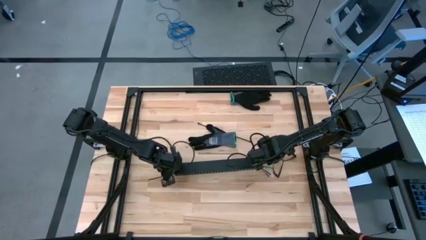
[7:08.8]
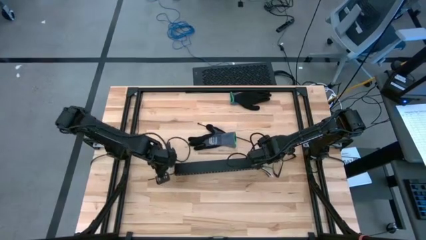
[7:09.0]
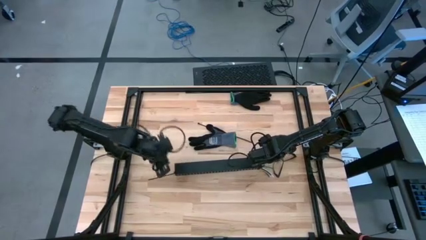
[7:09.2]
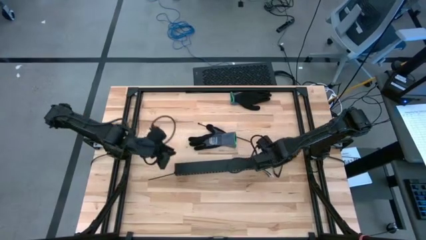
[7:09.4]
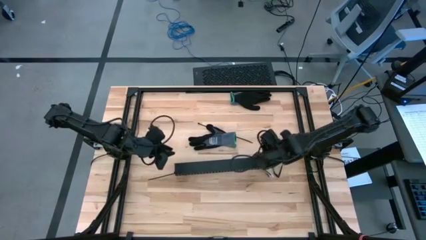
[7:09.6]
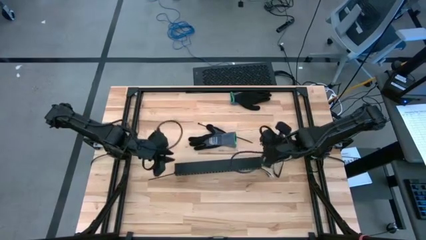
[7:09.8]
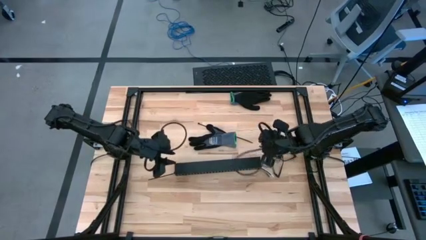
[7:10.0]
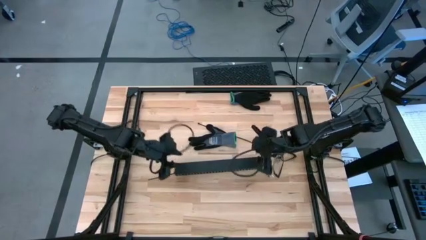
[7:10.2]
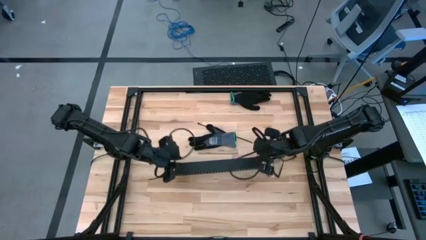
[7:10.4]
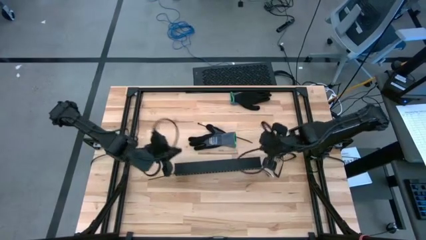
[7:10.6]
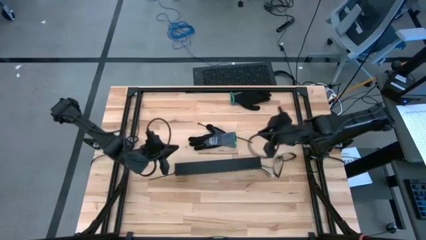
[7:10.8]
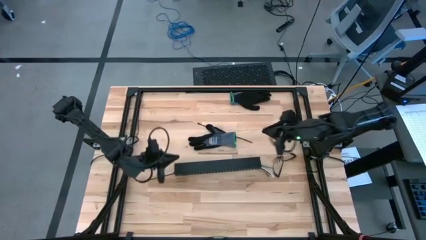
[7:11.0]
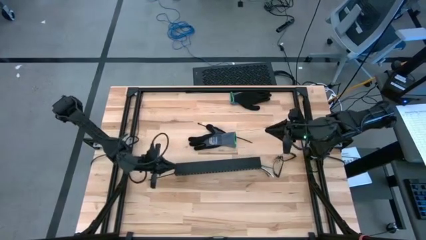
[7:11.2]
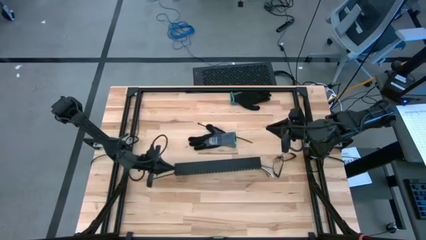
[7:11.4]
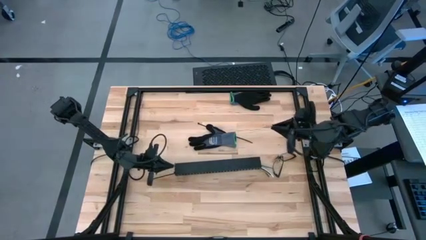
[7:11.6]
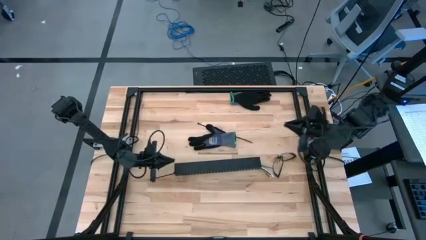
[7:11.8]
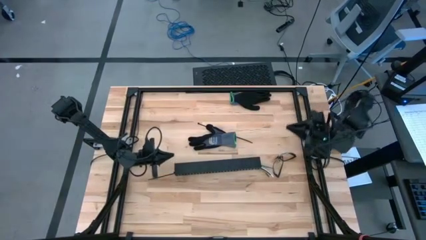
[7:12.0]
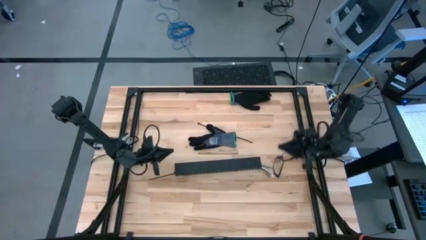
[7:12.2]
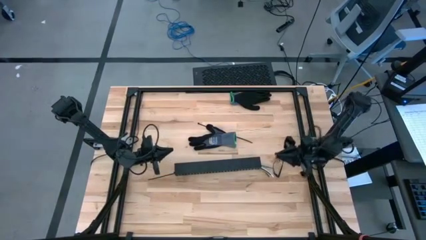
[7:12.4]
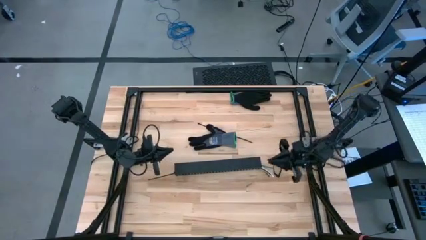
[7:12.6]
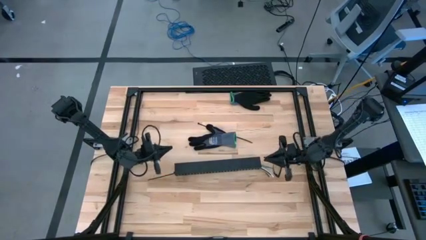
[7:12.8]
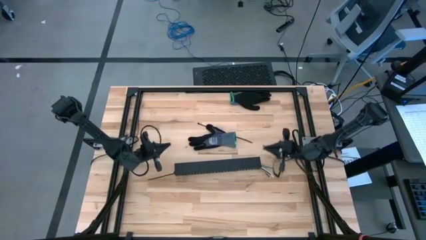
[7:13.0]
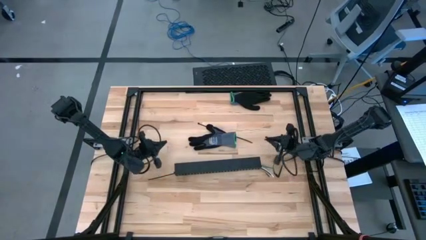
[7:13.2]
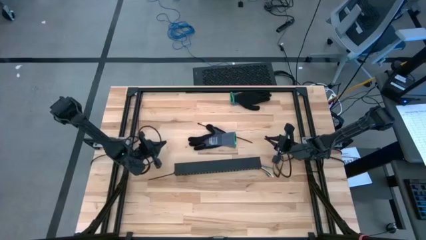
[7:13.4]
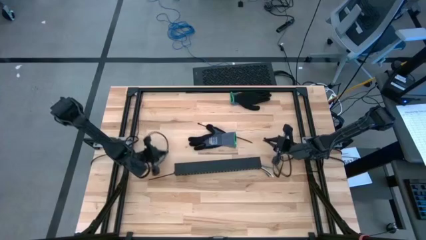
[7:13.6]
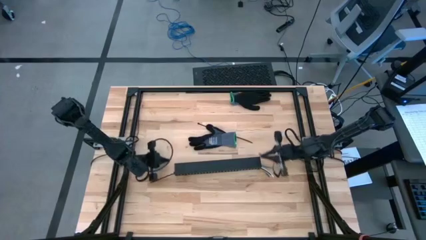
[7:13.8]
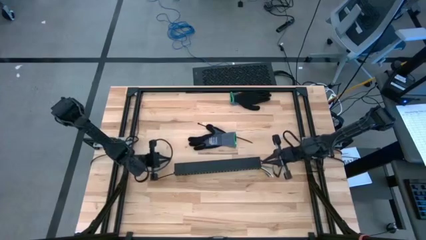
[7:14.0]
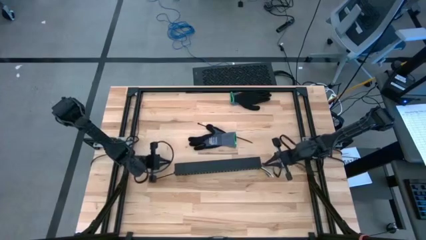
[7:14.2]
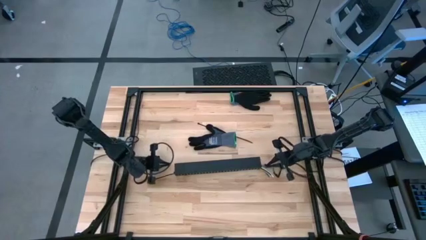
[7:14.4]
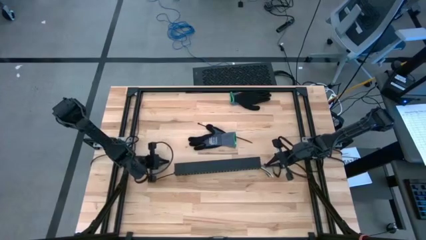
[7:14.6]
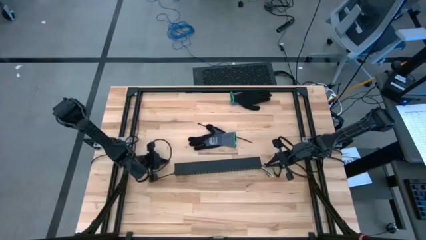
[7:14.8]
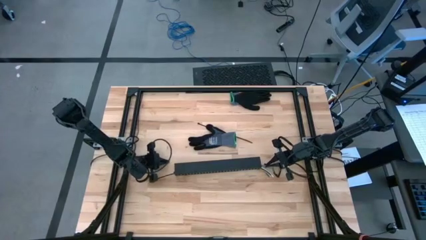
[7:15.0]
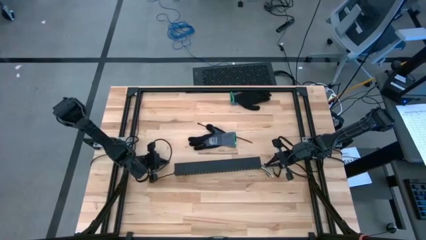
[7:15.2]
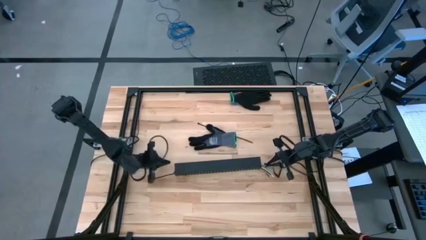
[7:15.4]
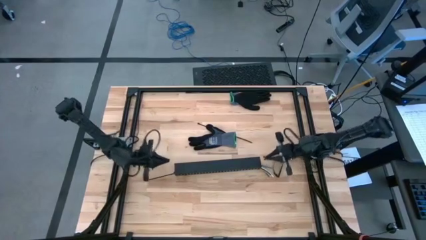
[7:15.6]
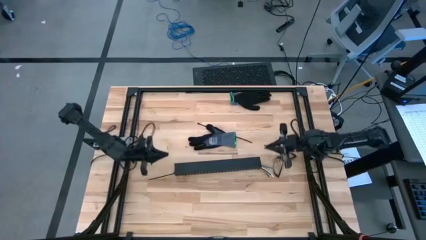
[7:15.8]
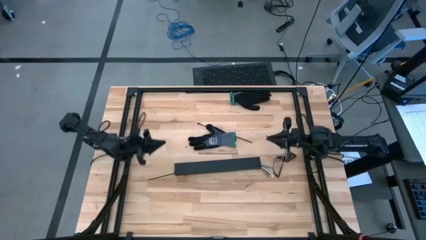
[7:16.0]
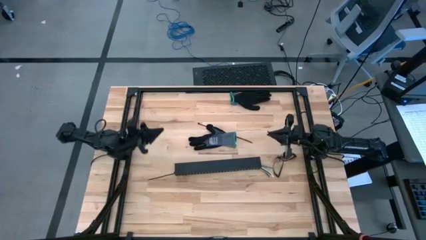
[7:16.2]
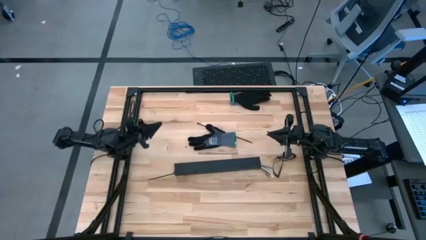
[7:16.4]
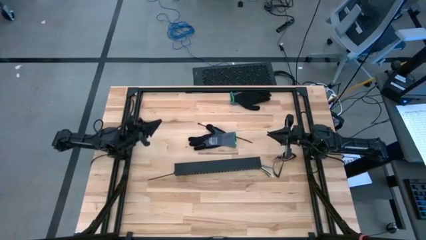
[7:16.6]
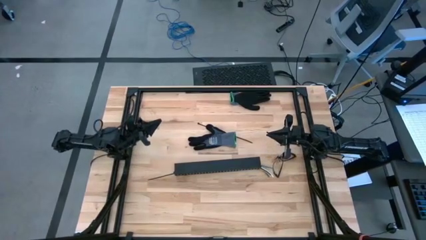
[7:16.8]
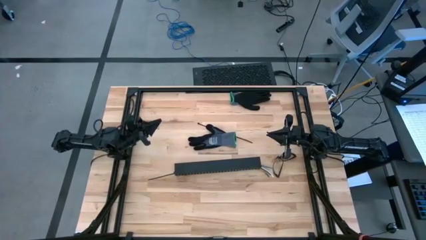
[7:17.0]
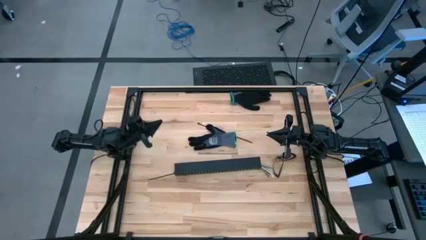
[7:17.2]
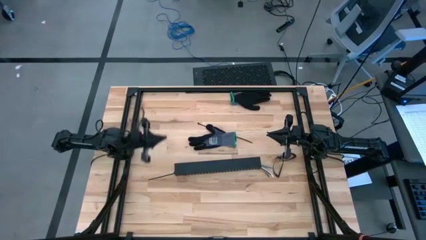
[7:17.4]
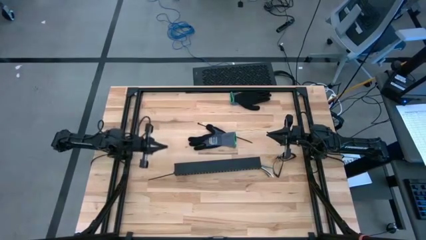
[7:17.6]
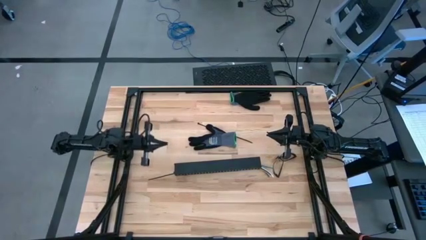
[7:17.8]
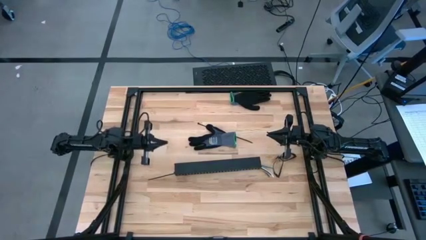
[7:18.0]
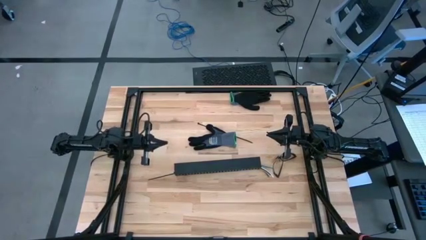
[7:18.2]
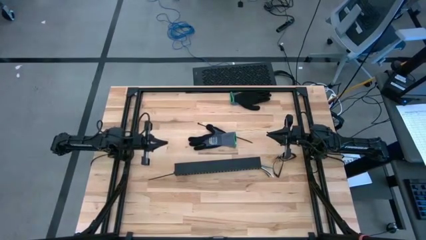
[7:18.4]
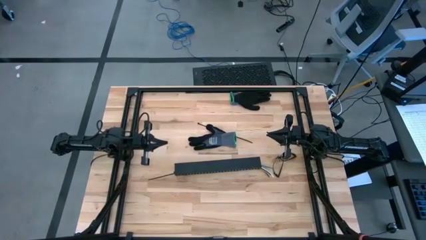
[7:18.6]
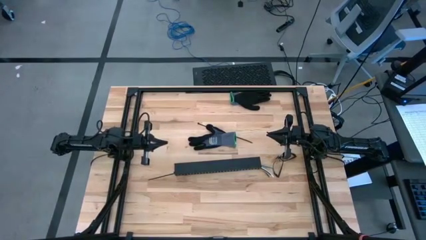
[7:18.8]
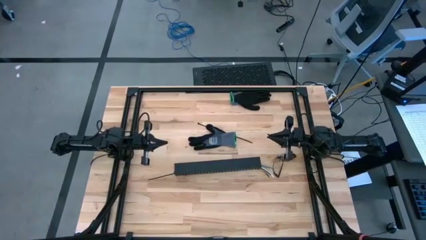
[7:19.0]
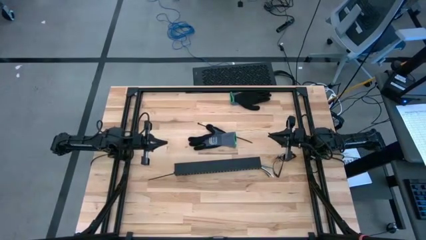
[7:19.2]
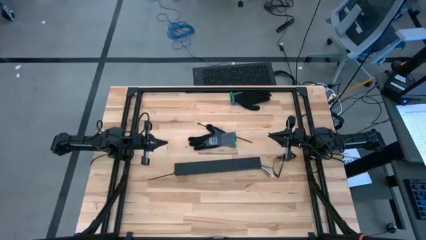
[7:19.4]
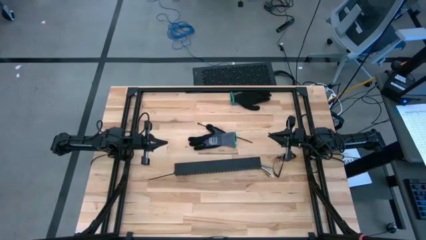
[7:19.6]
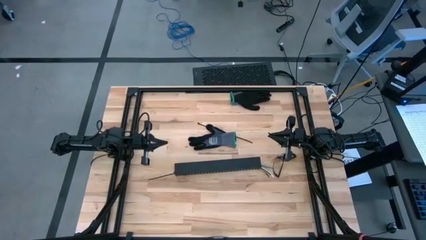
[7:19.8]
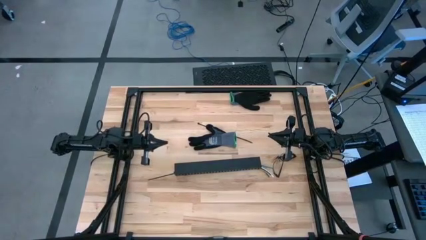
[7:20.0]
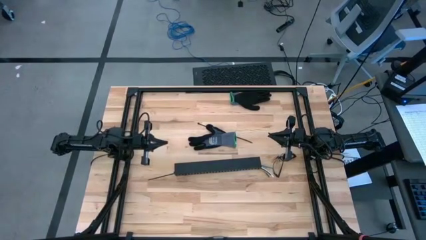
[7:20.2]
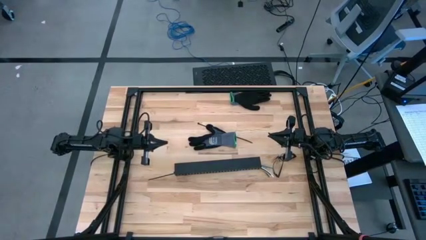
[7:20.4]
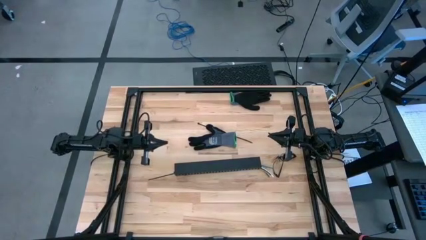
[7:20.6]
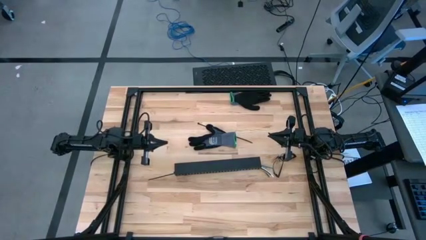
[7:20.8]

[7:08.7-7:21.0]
Task: Ziptie cables
Return to Home Position
